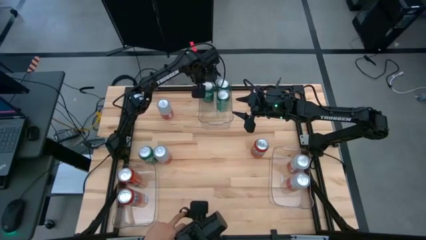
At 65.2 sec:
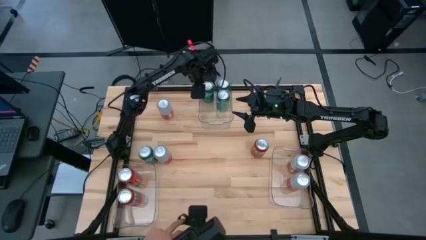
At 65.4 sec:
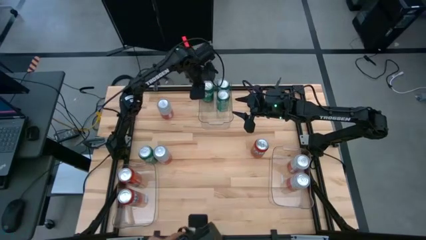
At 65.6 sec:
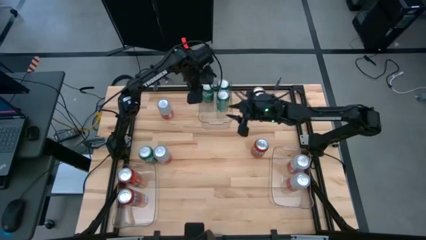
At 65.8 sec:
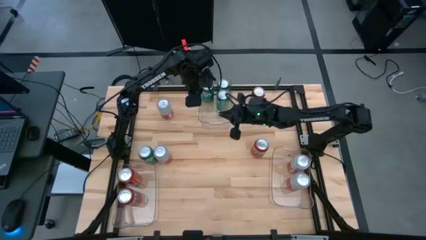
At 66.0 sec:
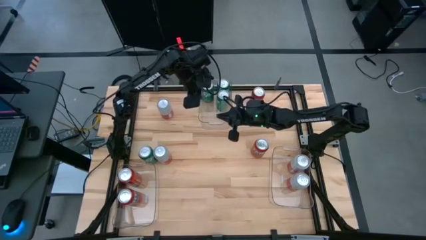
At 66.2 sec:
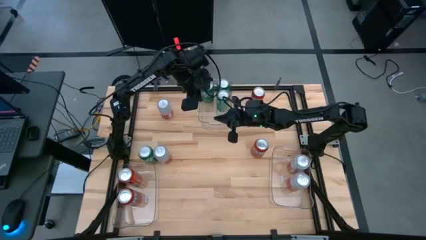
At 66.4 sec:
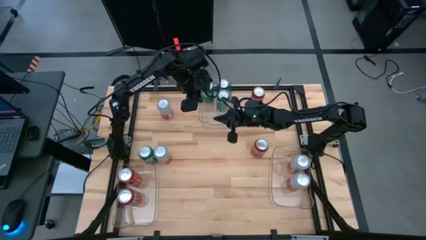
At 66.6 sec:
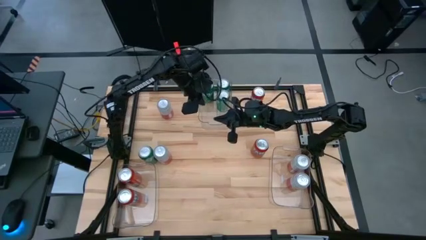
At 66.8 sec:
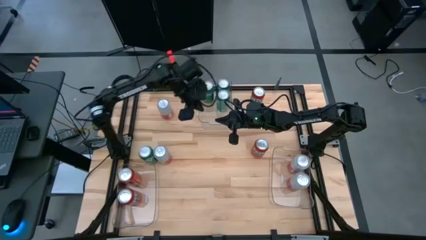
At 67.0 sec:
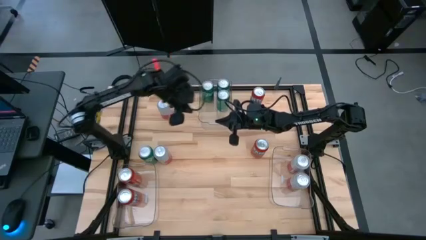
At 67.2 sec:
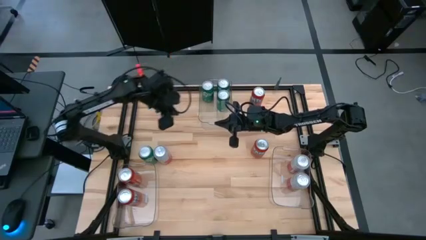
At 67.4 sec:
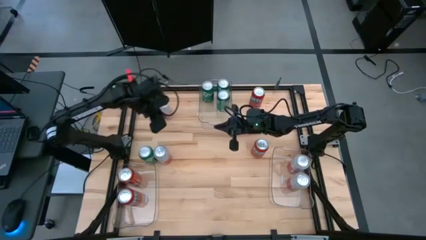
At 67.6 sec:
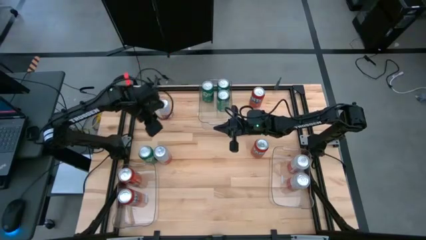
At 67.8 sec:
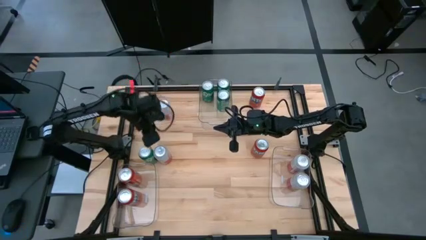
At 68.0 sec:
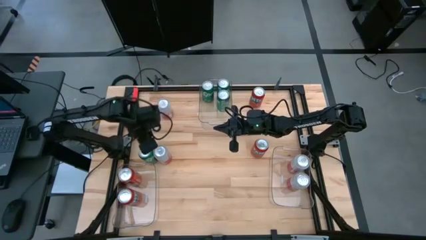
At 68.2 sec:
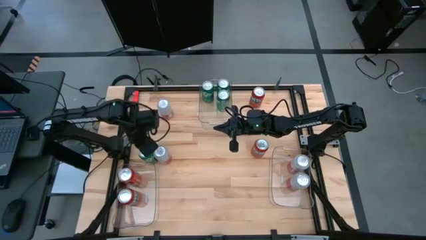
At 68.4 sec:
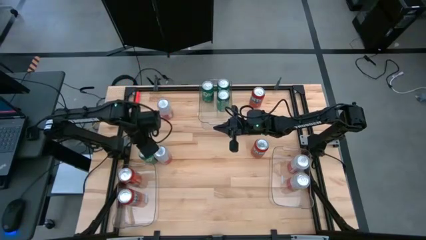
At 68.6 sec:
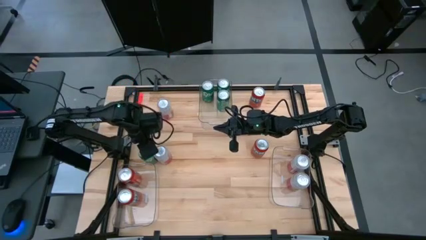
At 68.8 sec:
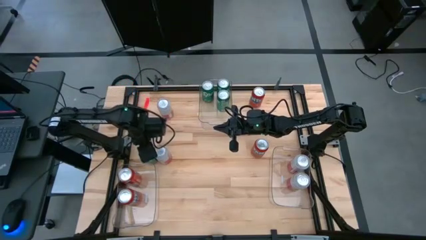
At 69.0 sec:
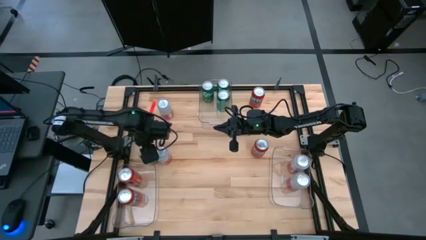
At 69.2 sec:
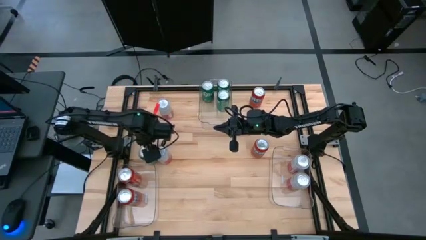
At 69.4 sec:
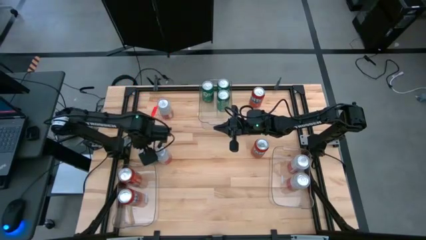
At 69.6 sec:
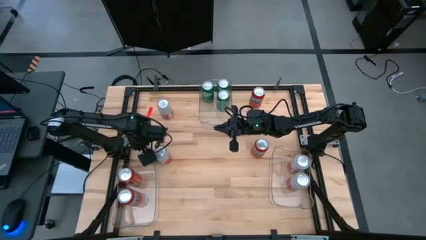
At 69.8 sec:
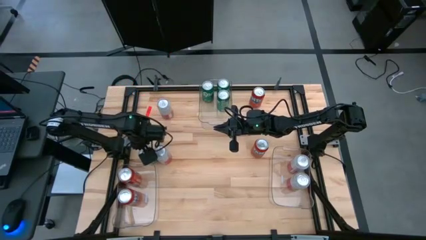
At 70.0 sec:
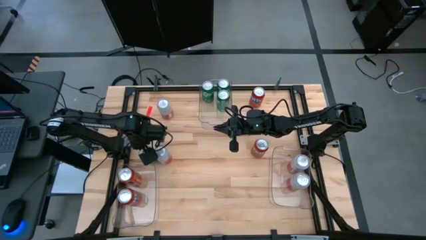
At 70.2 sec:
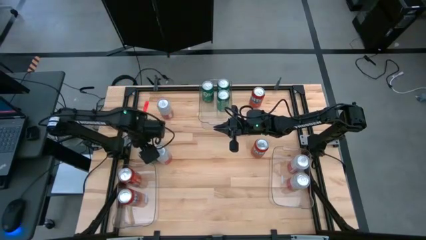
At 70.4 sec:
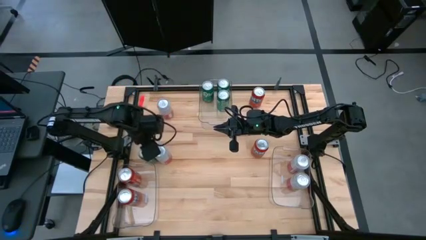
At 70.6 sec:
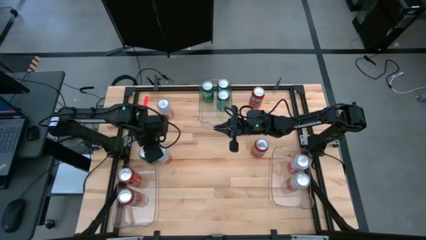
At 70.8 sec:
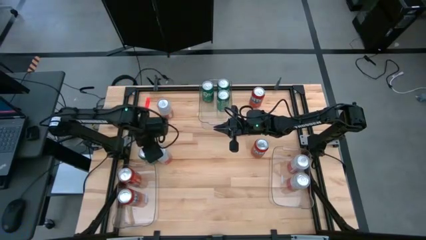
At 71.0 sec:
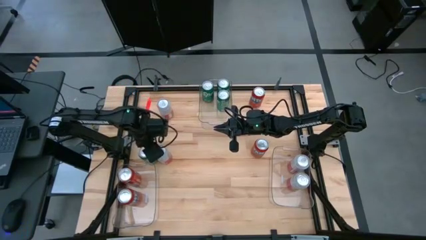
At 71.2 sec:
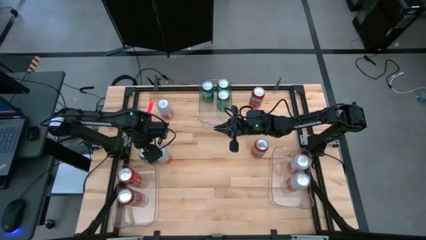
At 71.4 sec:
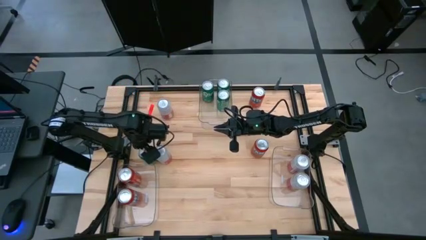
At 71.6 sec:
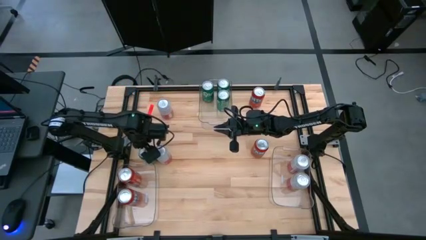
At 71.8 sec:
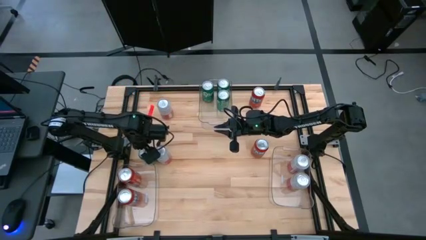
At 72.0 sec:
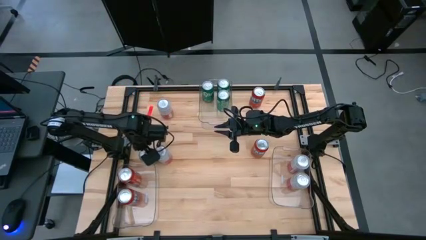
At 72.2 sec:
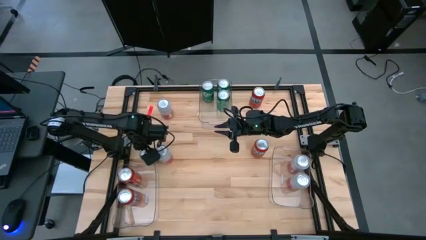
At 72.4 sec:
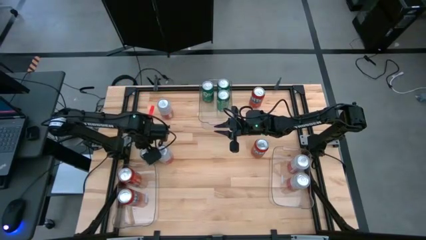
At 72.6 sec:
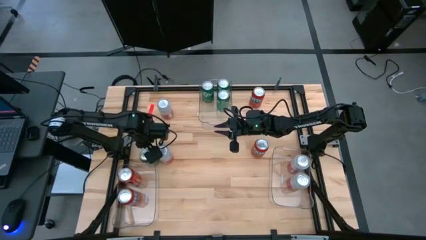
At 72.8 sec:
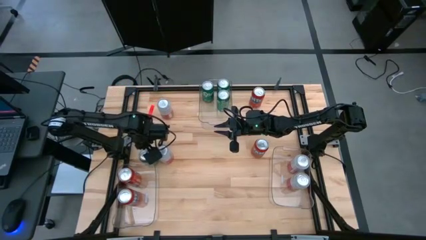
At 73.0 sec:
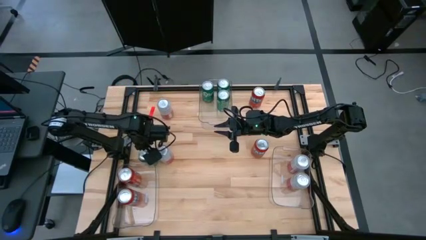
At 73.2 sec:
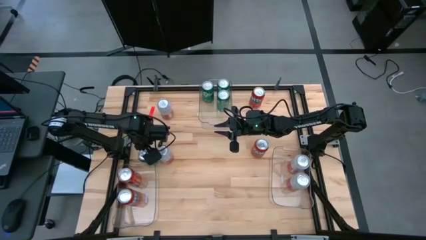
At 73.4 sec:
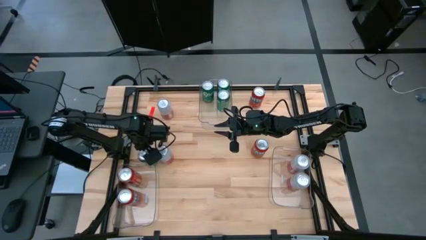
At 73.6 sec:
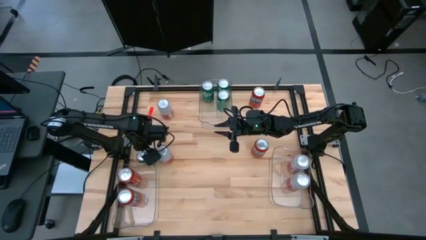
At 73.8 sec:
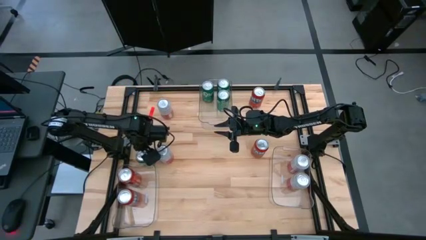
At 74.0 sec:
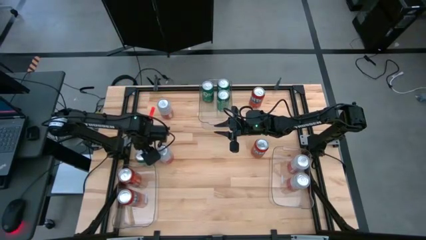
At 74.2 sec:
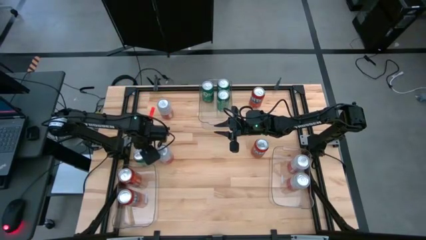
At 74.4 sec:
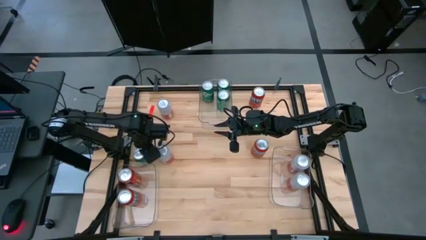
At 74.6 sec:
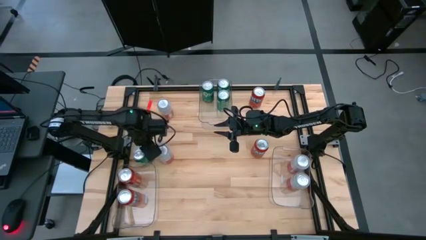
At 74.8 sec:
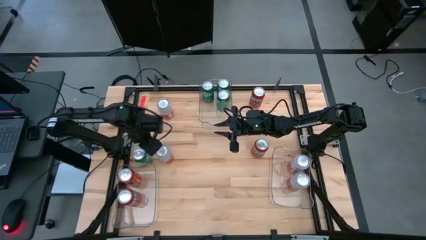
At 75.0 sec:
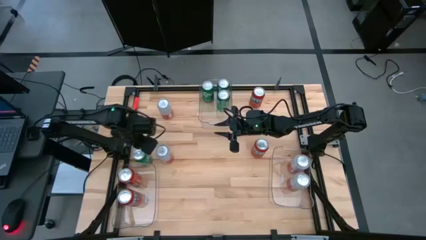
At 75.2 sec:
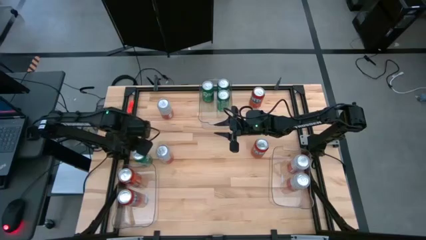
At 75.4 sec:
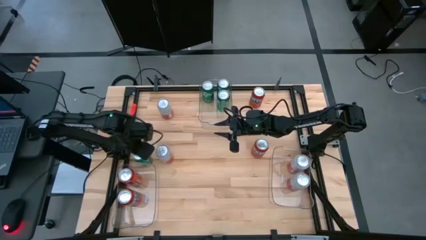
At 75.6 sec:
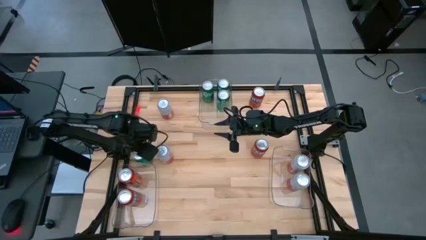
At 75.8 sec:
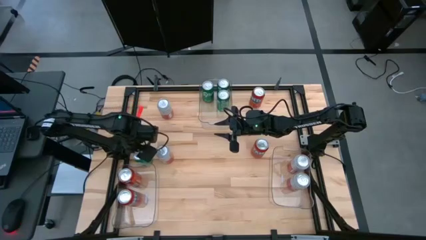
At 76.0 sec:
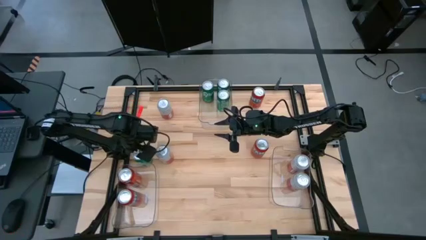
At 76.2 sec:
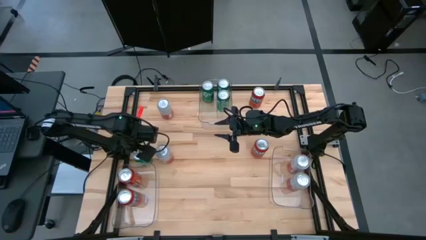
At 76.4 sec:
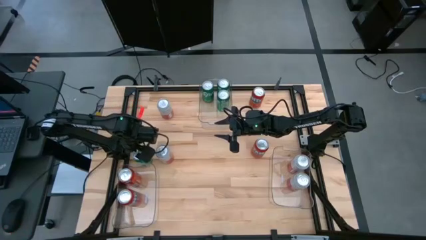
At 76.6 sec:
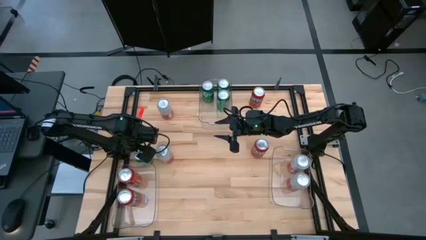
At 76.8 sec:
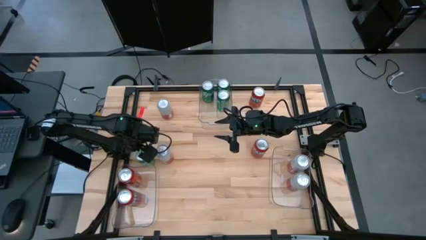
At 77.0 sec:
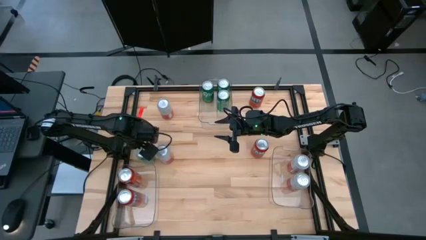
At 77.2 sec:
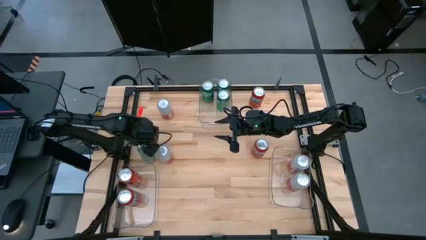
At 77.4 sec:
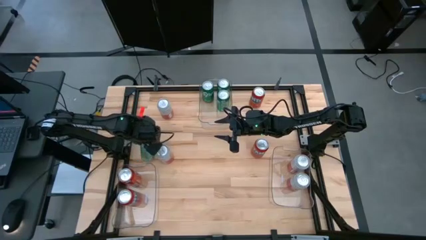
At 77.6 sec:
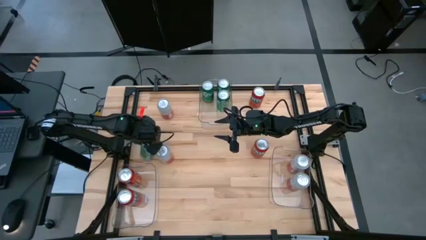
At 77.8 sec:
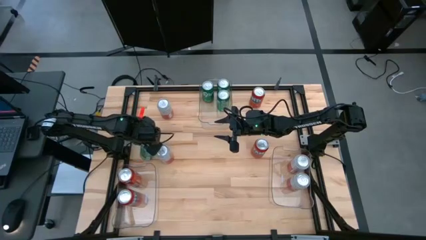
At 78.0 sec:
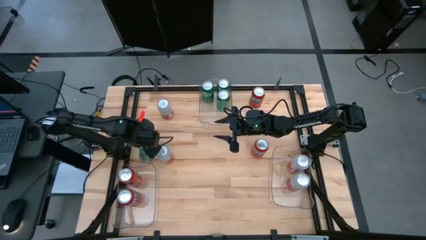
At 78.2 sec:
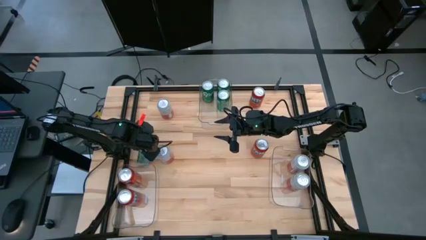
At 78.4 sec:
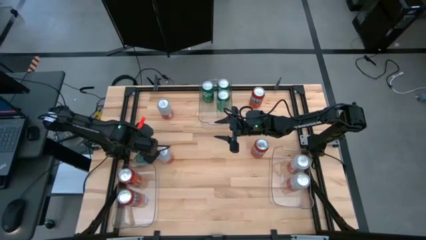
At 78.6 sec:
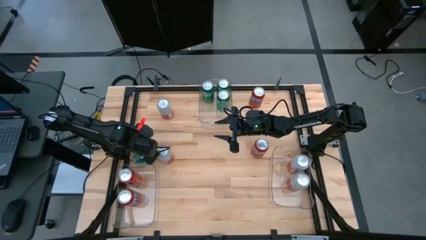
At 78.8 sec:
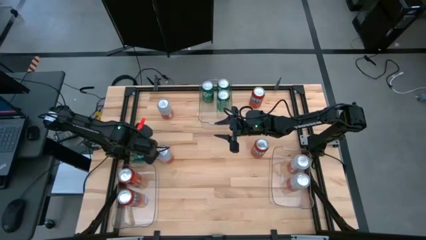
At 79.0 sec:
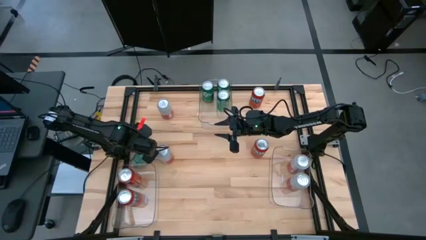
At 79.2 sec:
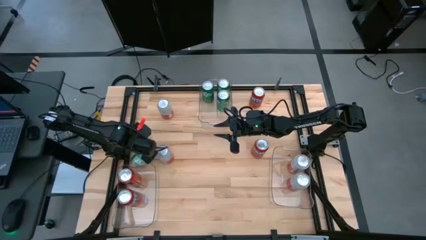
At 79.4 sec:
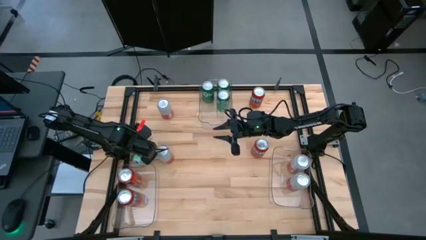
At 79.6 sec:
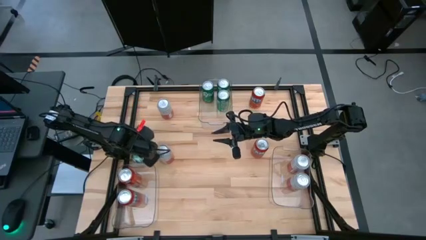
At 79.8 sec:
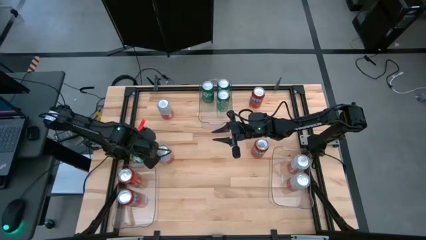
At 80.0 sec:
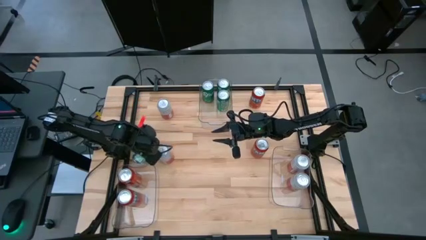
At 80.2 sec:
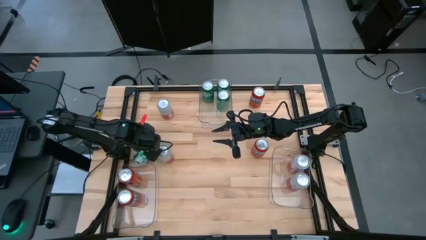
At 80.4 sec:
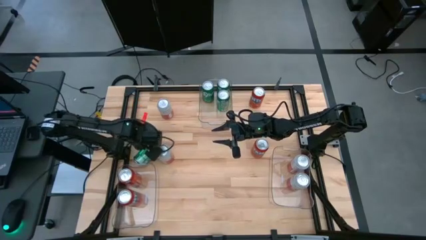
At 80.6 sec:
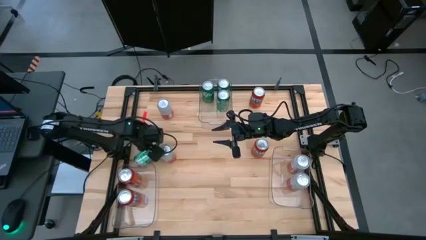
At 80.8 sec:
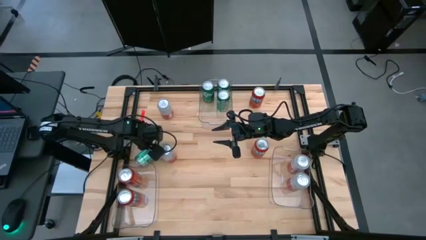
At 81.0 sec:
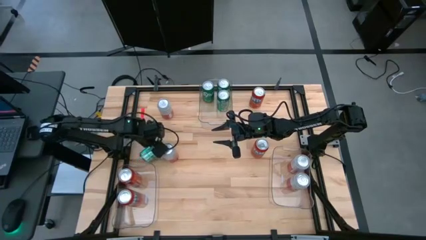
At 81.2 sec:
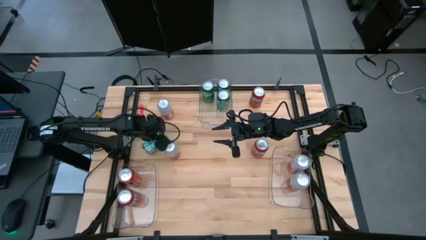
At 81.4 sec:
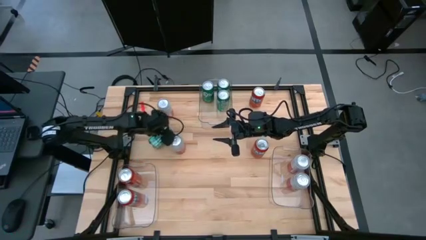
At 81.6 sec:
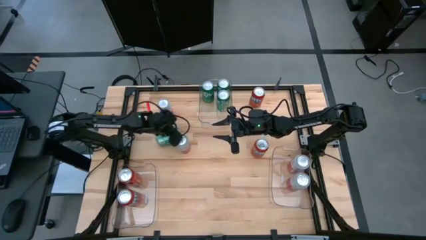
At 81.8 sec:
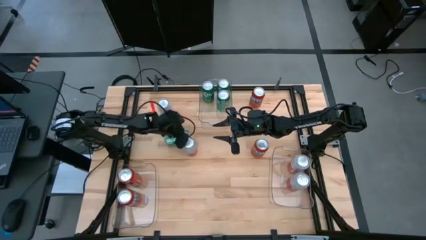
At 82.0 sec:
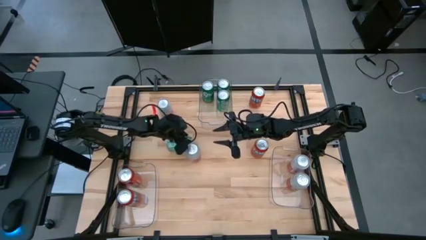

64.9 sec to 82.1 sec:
Task: Sort soda cans
Put the green soda can into the top transparent bin
